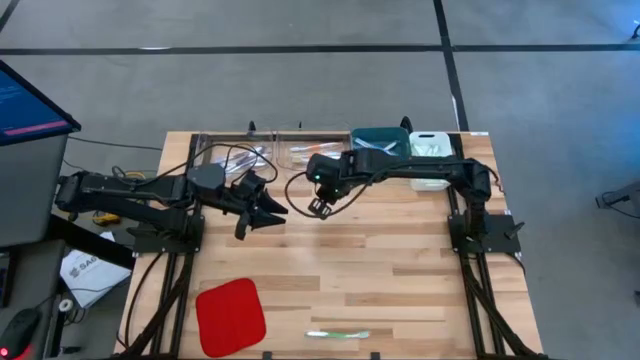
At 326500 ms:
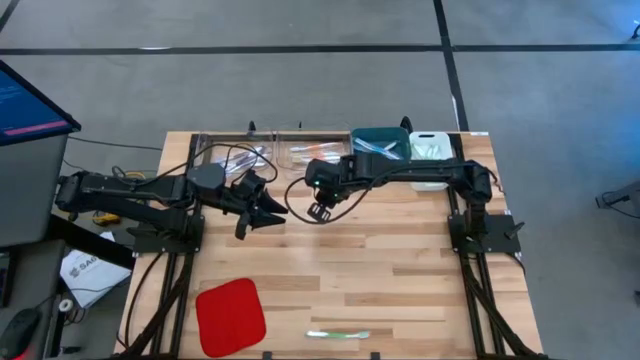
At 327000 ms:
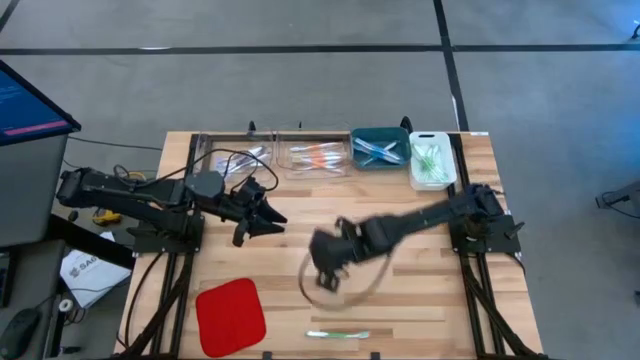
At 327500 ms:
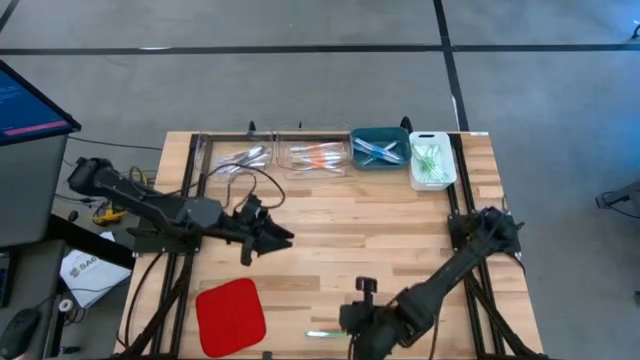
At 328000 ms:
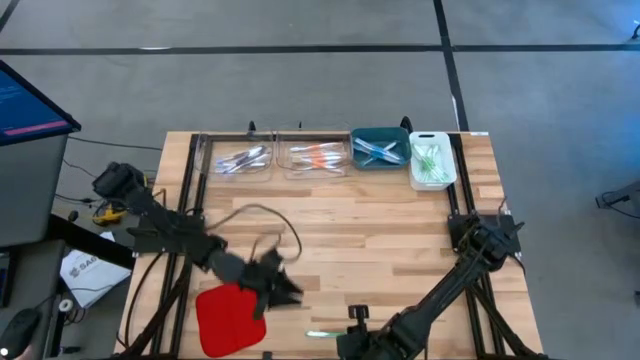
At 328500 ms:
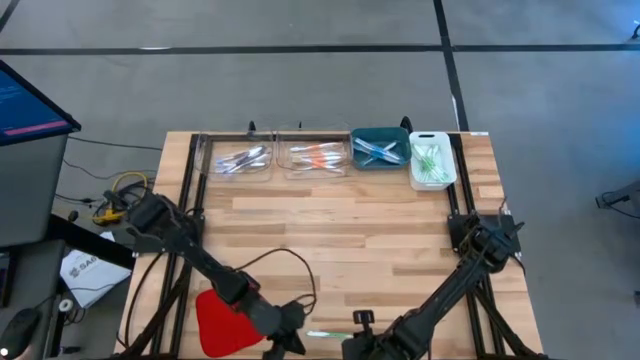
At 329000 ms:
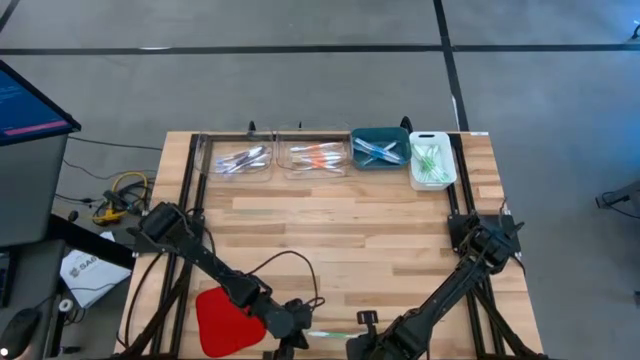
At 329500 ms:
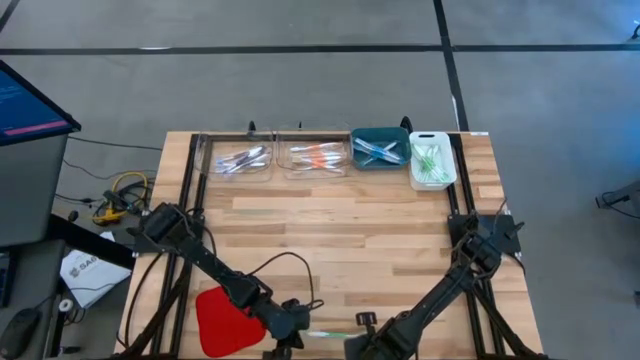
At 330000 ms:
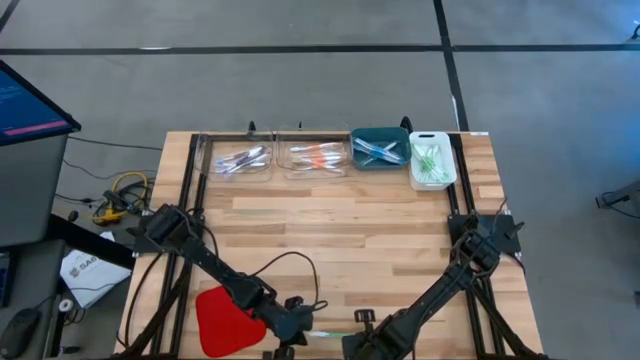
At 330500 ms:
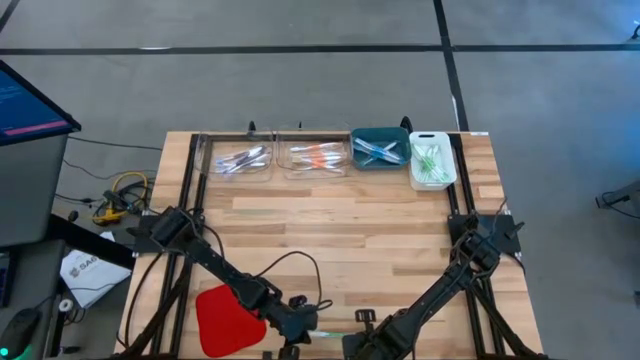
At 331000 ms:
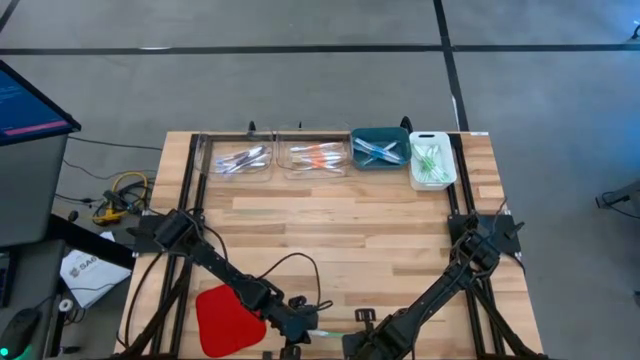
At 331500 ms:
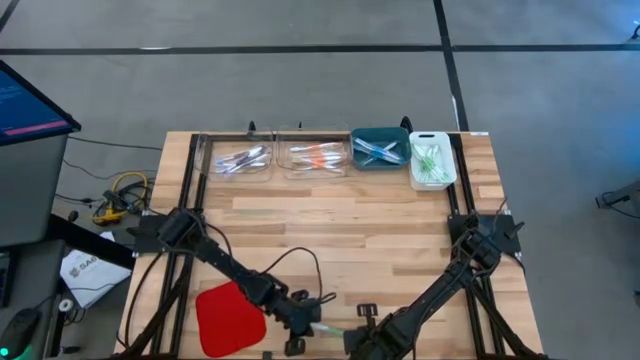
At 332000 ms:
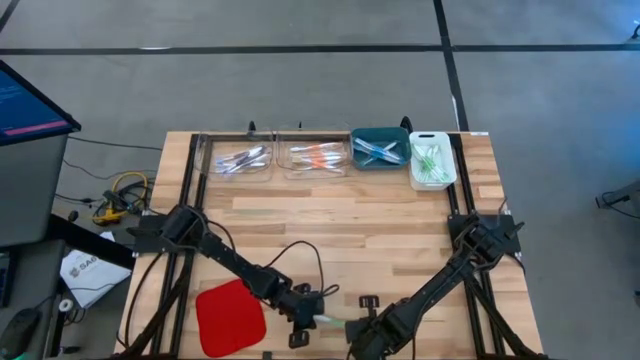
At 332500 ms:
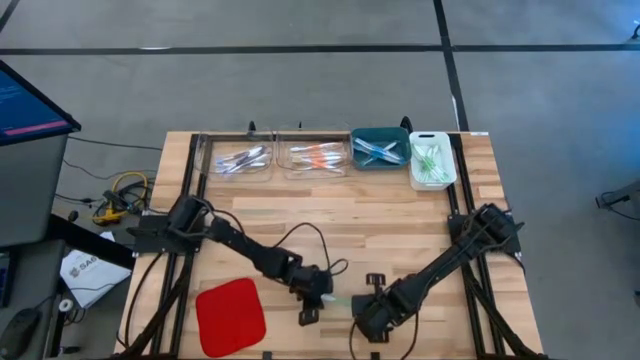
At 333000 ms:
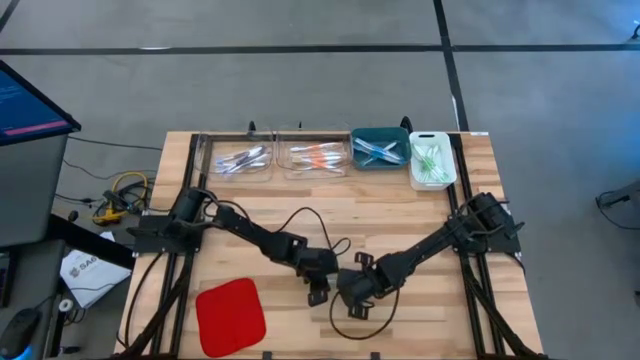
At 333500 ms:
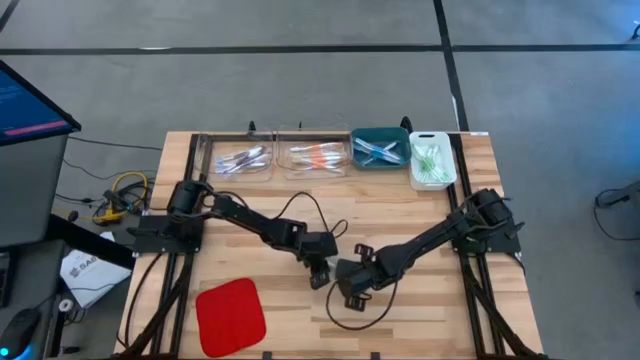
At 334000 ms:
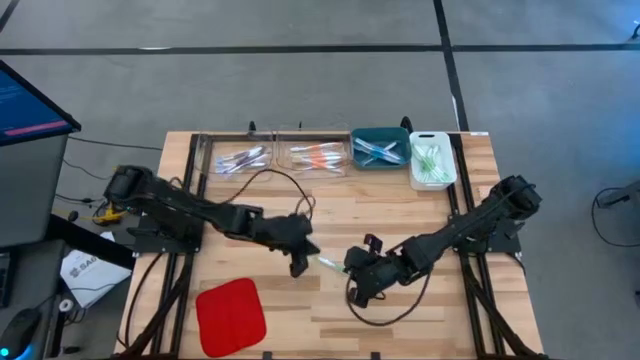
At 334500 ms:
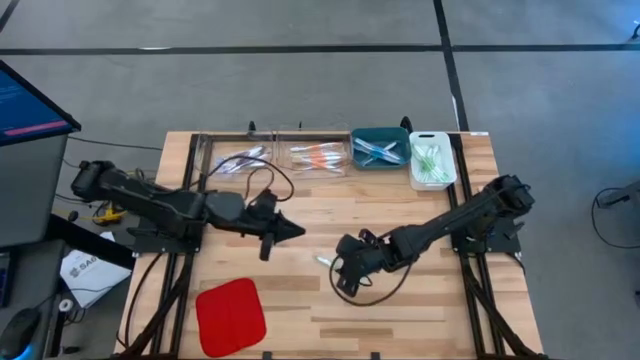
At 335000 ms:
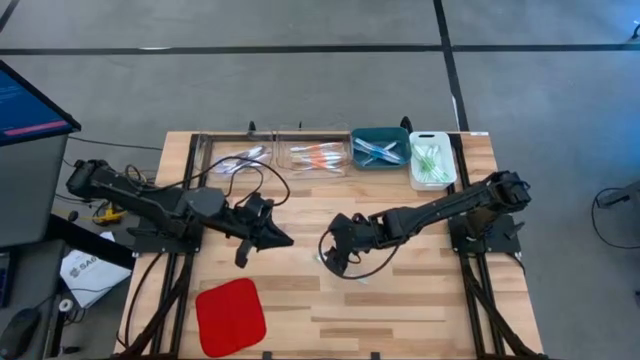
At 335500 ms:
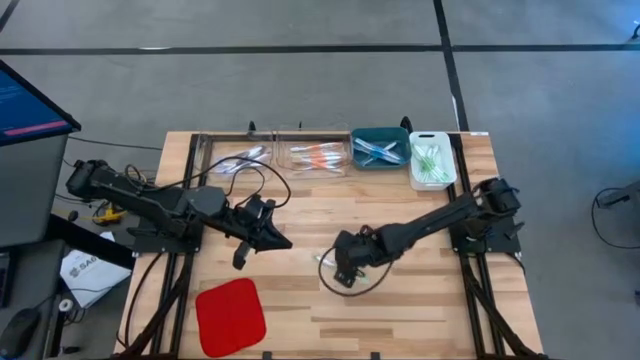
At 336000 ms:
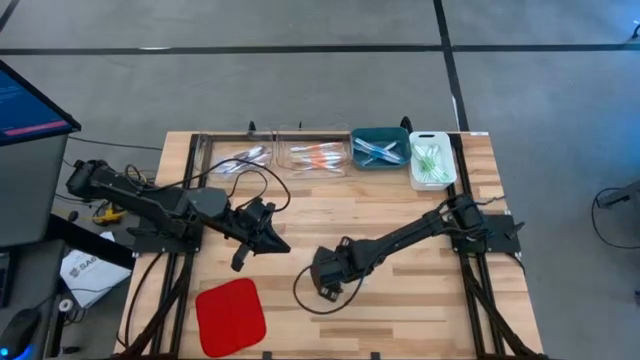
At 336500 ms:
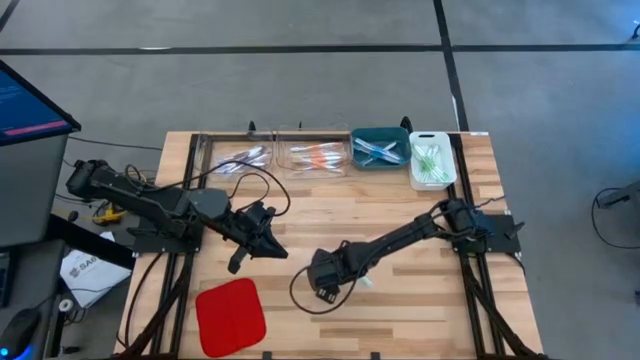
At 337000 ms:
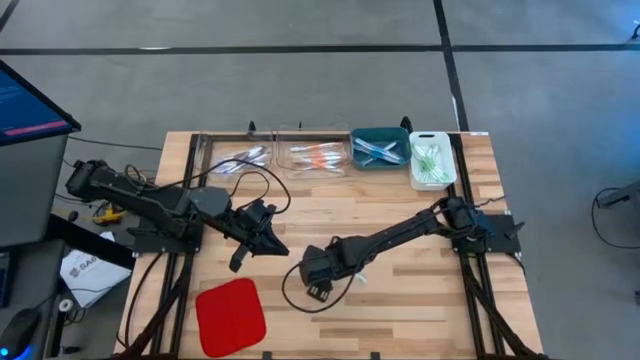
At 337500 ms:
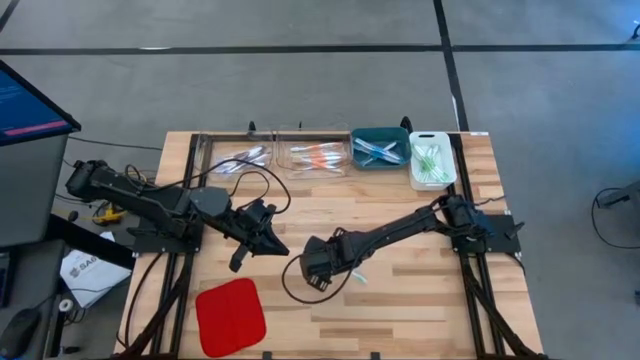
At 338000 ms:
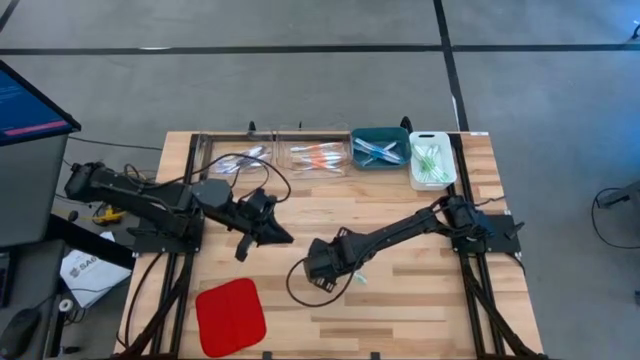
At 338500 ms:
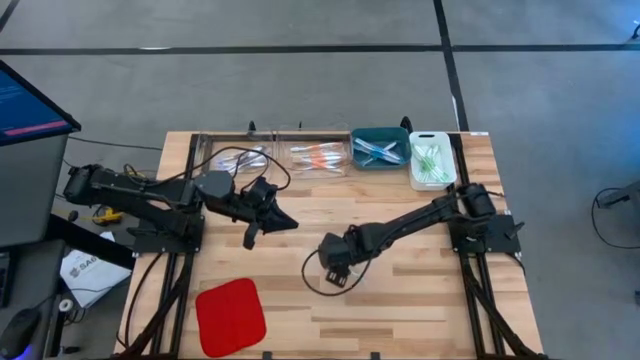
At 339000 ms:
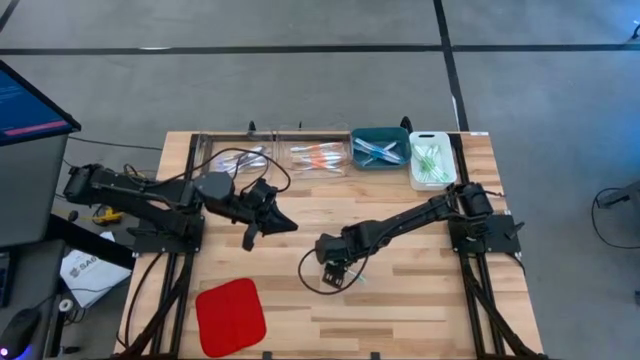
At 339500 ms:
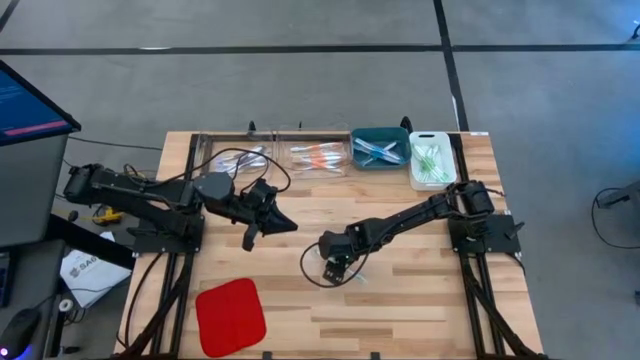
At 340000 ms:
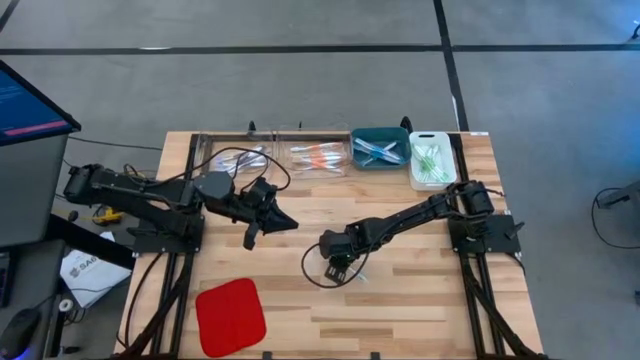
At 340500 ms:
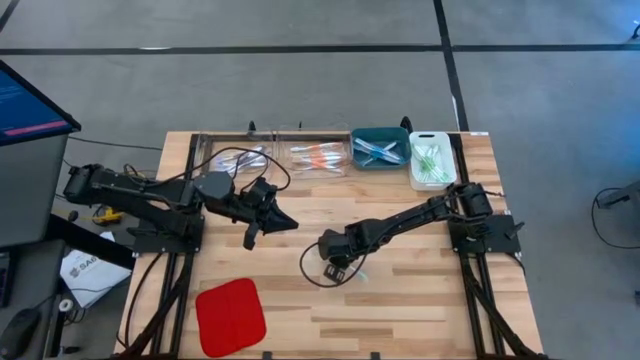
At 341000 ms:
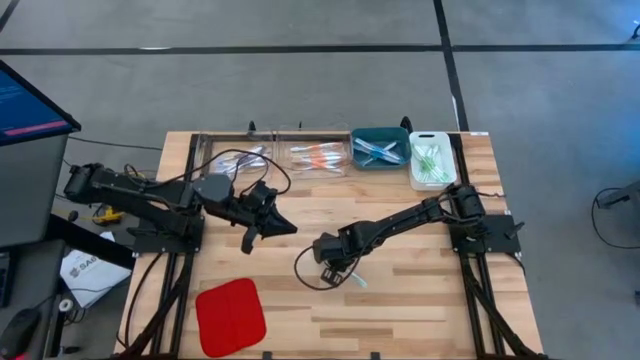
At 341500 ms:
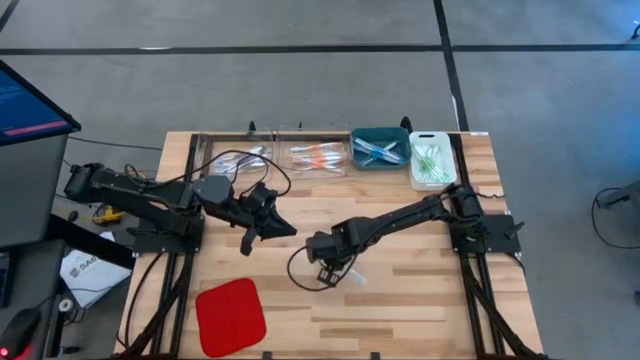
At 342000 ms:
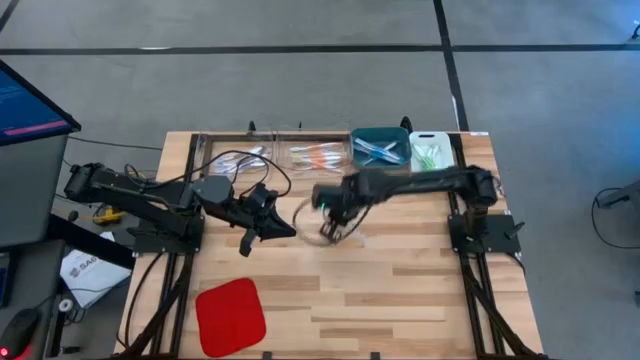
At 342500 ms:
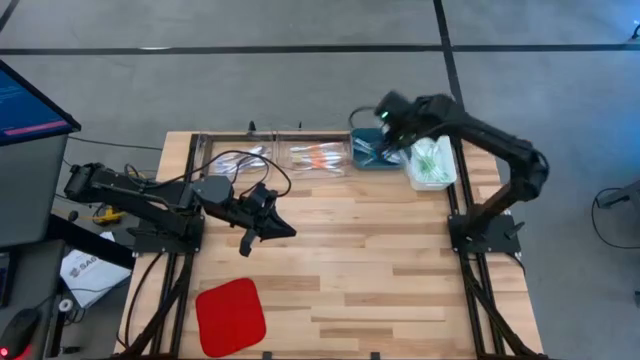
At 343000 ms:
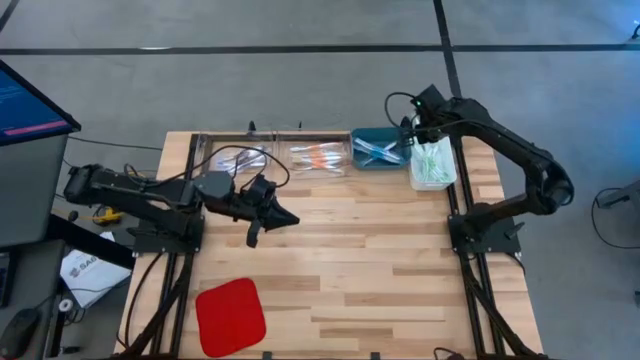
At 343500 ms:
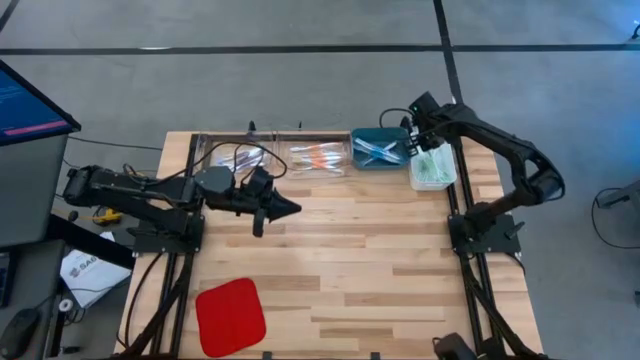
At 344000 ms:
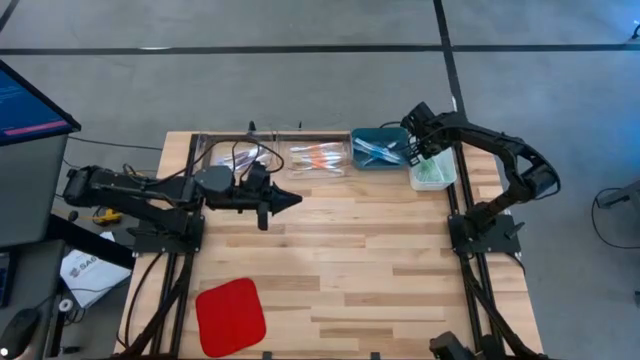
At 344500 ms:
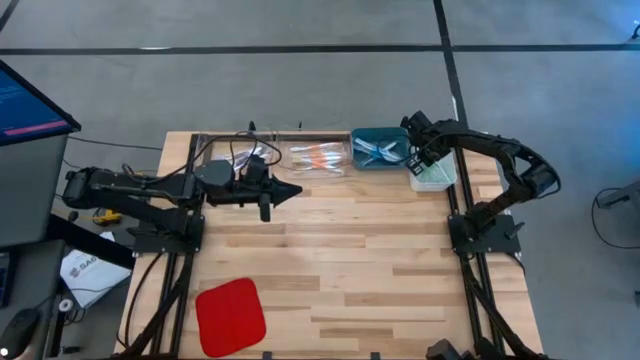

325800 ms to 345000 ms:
Task: Pick & Place Toothbrushes
Put the green toothbrush into the white bin
